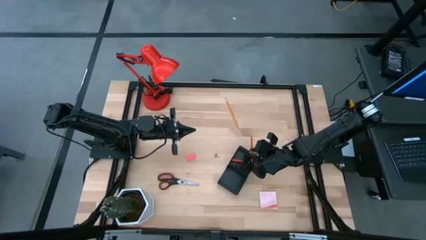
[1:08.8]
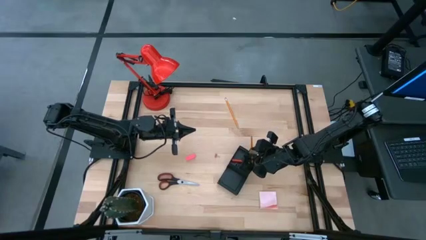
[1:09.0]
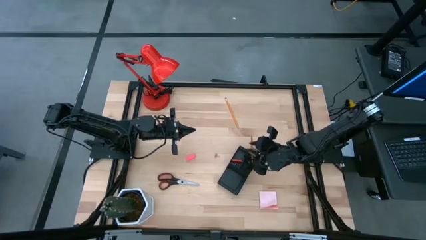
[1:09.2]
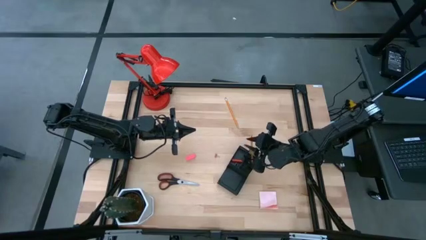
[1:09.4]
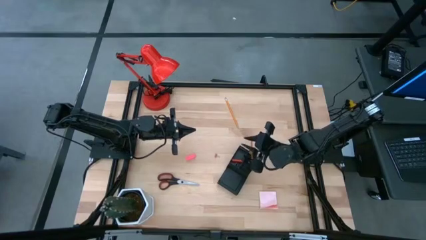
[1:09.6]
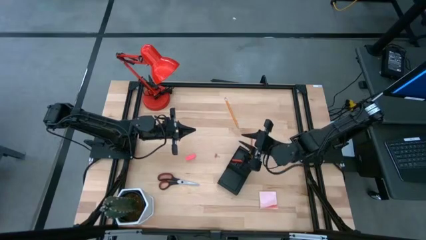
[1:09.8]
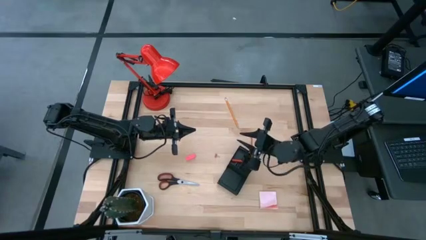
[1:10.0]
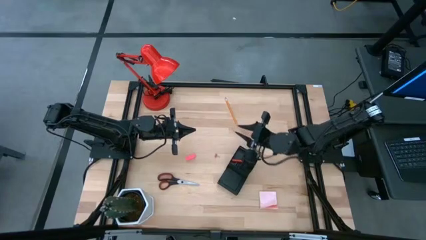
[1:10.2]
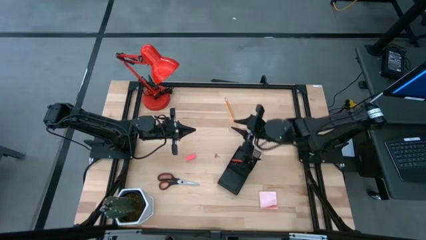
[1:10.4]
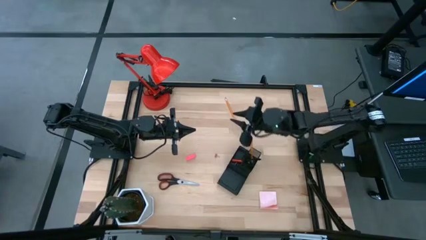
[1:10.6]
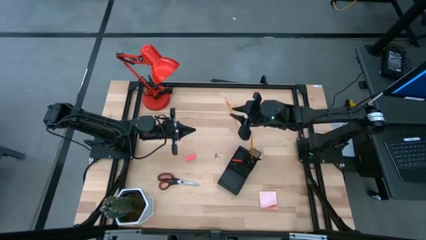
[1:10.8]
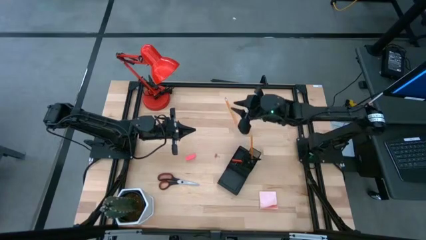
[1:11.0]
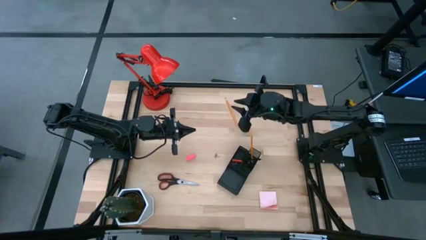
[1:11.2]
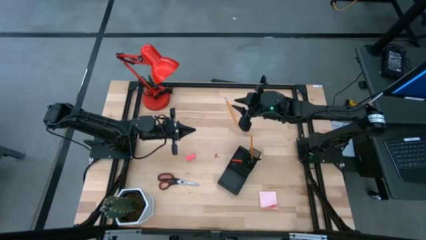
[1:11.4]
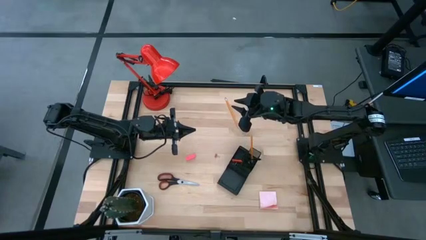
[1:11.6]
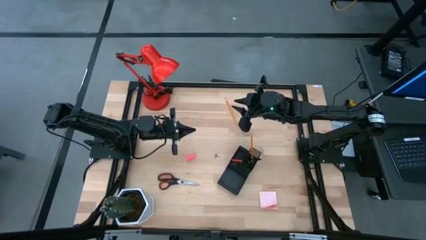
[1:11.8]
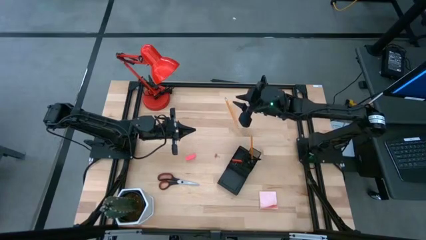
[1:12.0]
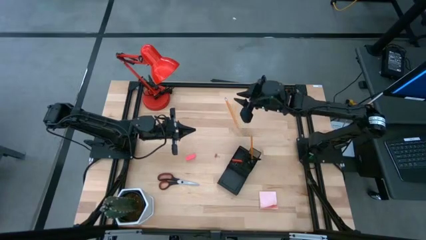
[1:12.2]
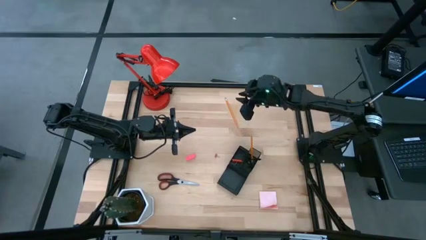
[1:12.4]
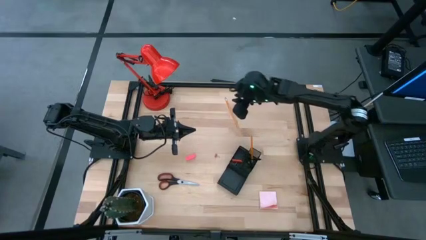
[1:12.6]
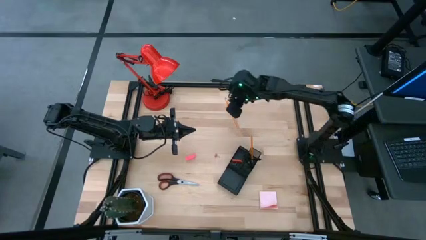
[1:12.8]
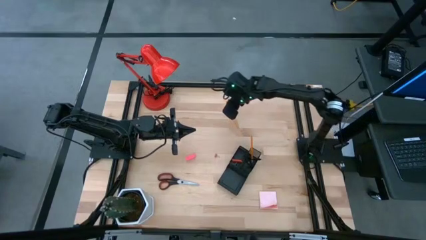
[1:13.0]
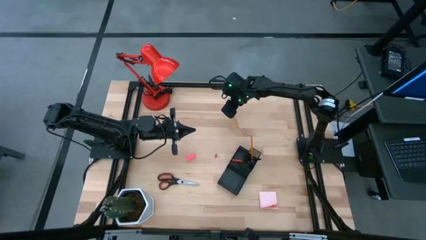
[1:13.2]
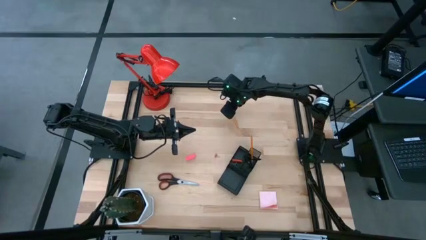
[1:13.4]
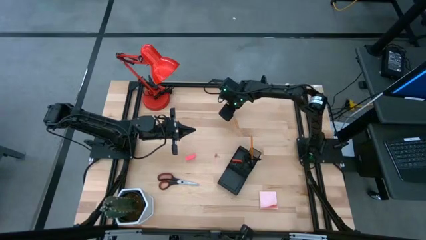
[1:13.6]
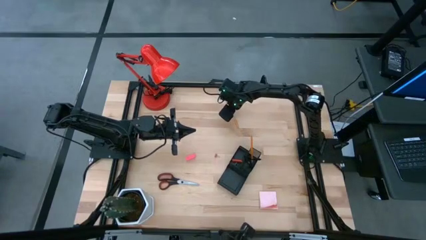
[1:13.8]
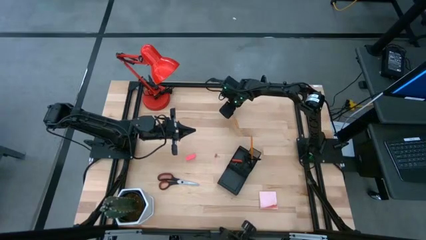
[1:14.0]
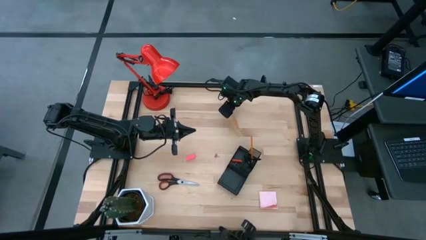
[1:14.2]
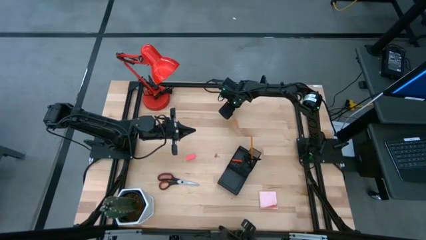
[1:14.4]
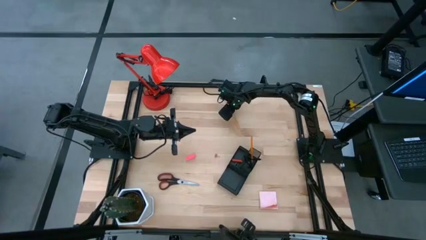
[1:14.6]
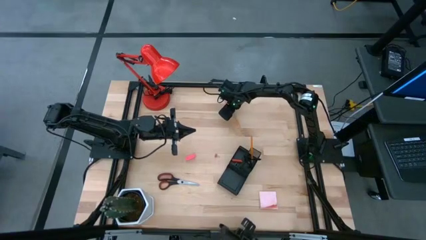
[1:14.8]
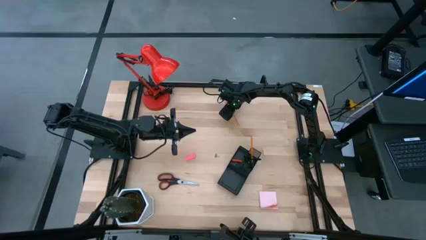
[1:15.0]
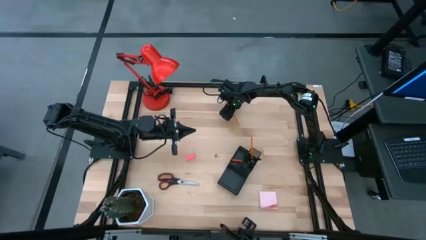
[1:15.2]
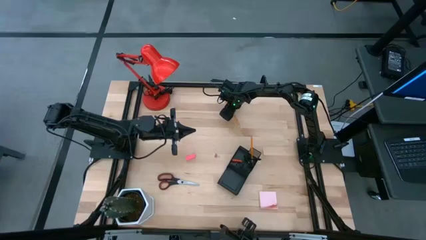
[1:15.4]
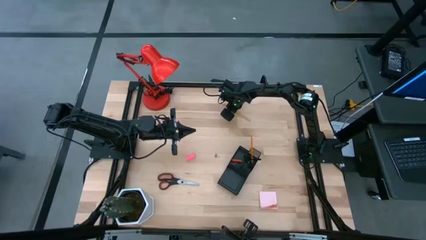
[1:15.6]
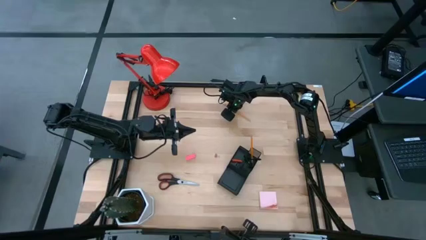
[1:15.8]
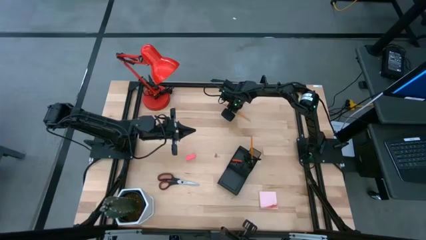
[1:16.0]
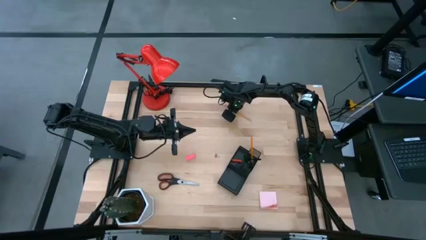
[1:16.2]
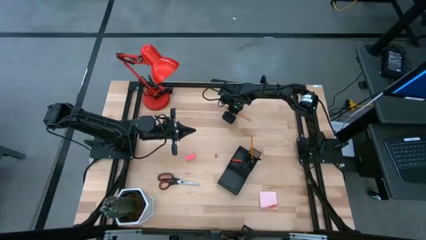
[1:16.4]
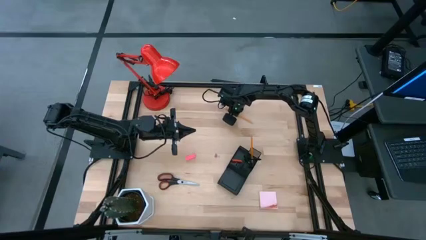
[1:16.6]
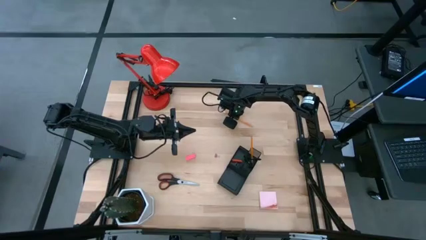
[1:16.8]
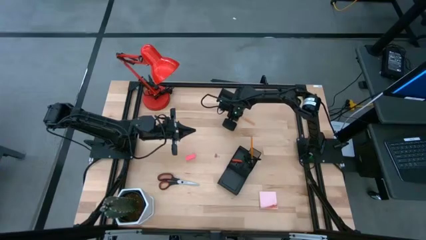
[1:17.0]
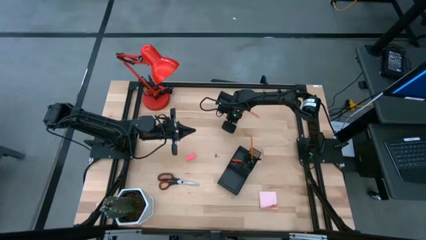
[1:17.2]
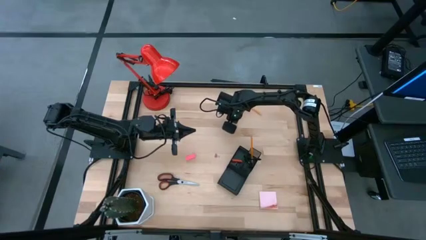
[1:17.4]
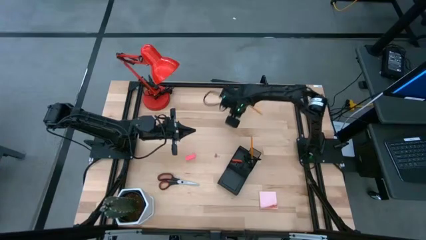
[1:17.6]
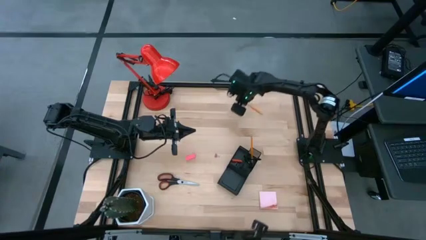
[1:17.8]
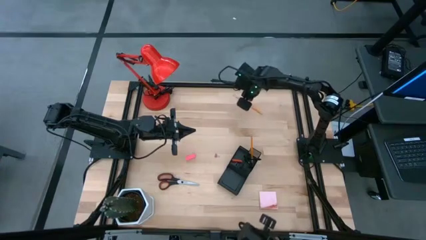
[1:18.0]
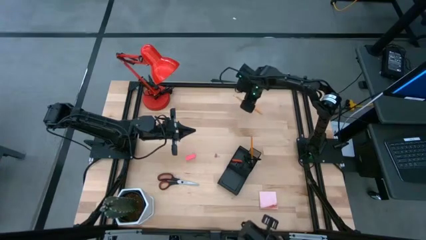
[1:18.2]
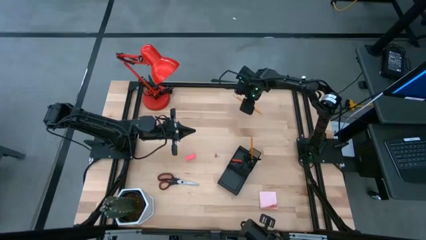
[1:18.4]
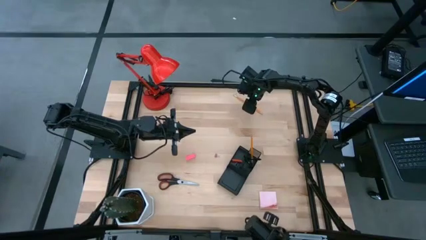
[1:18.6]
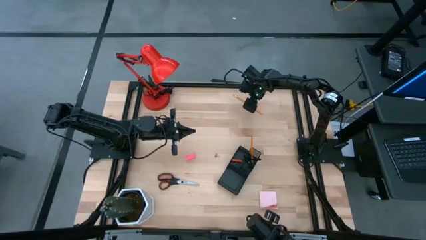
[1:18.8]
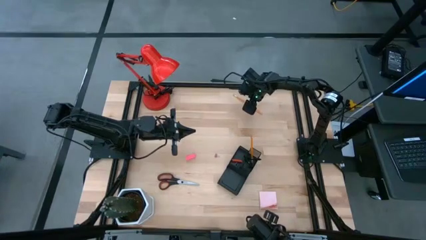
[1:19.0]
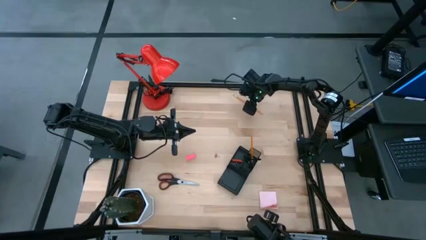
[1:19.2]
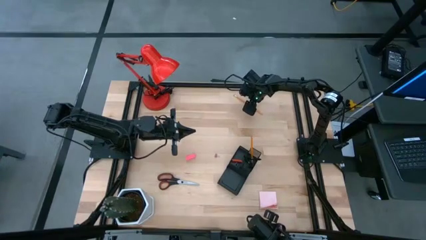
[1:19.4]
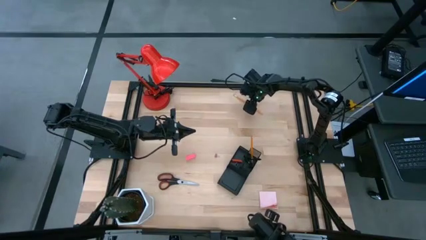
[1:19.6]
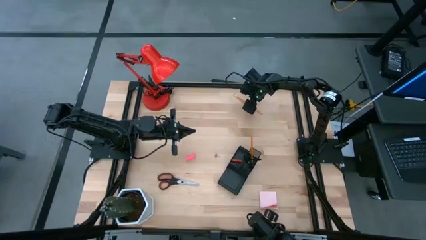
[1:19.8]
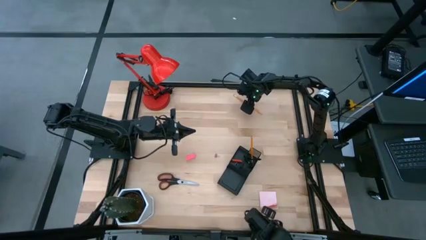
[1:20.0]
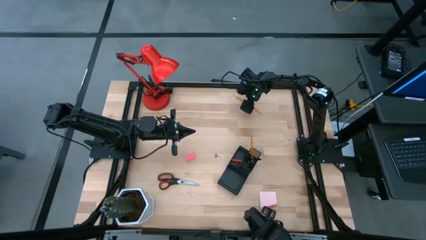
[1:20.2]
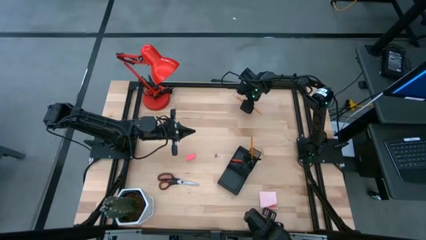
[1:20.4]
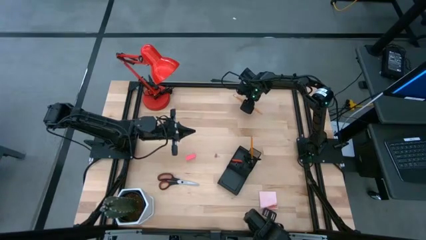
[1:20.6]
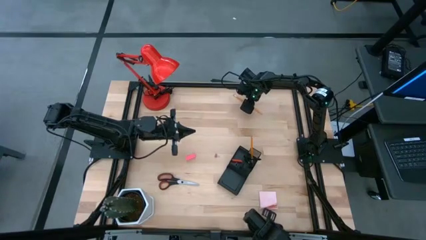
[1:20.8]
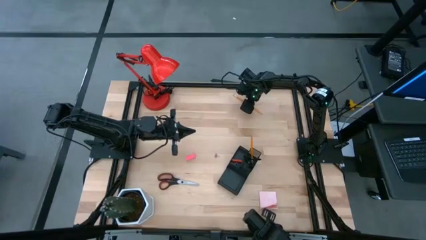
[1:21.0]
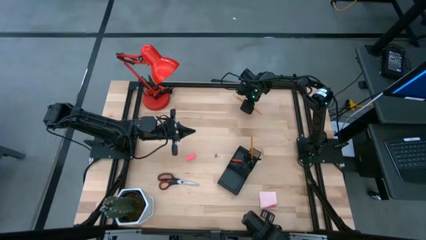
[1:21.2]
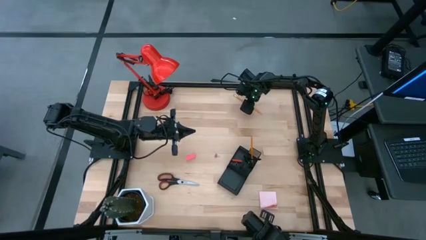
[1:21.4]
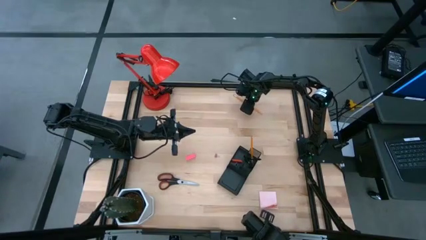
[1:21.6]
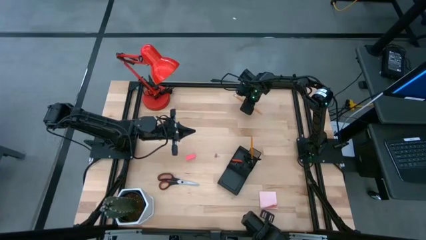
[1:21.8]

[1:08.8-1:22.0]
Task: Pick and place office supplies into organizer
Put the pencil into the desk organizer
